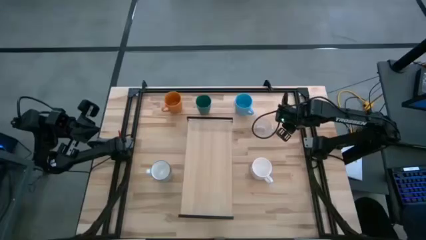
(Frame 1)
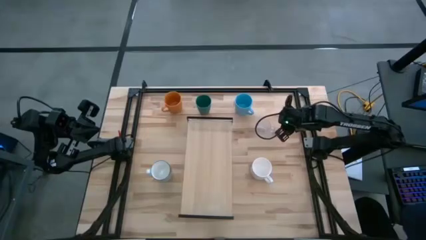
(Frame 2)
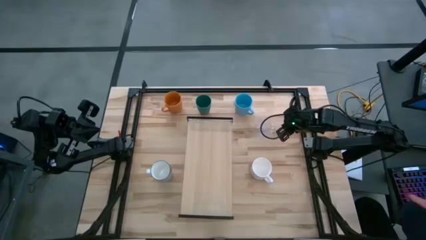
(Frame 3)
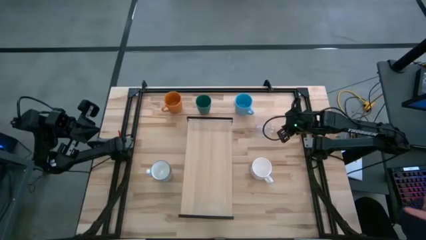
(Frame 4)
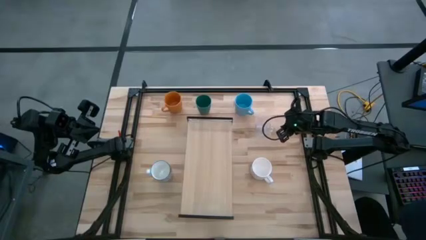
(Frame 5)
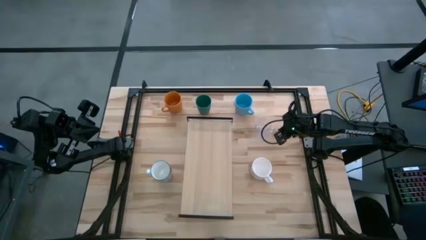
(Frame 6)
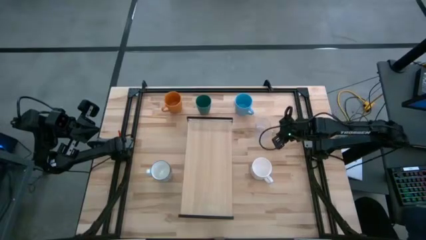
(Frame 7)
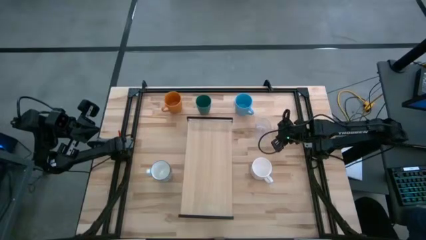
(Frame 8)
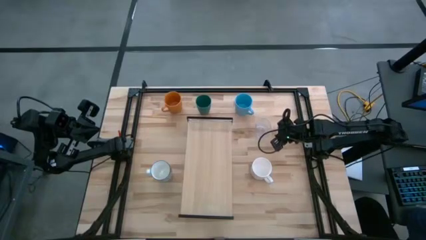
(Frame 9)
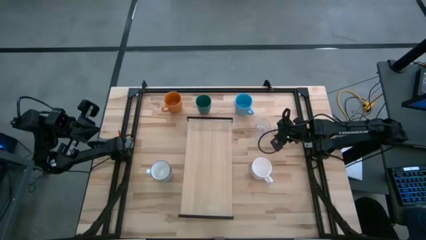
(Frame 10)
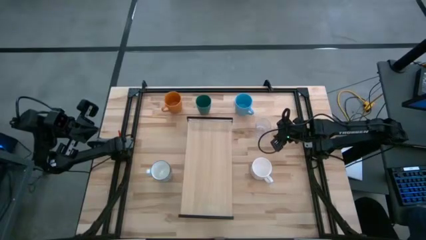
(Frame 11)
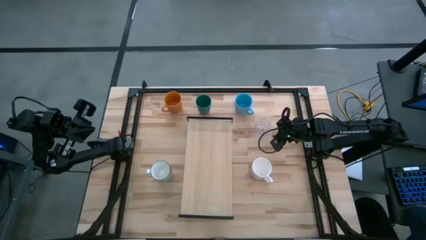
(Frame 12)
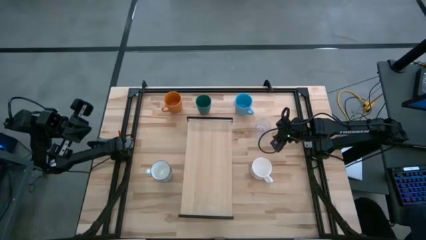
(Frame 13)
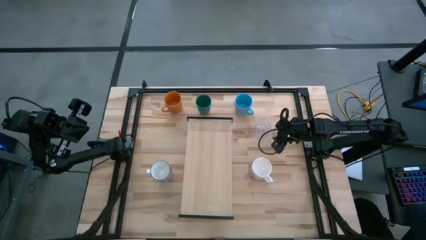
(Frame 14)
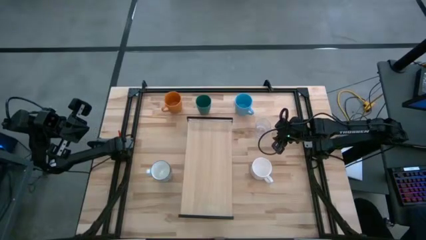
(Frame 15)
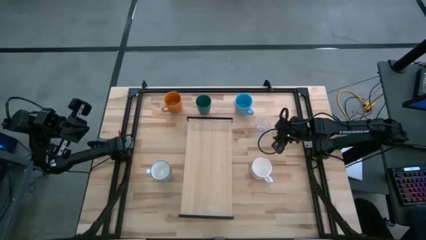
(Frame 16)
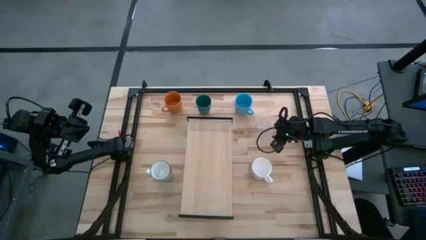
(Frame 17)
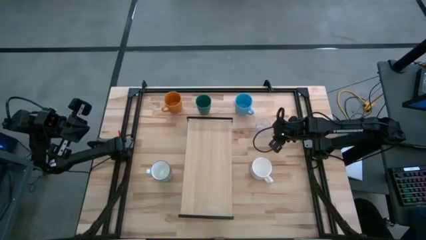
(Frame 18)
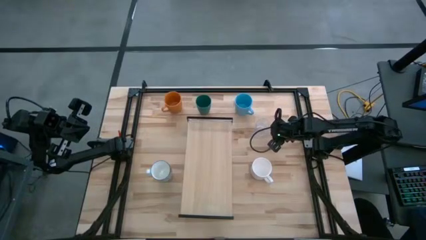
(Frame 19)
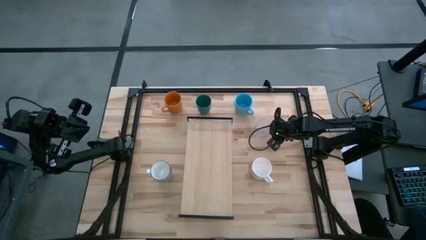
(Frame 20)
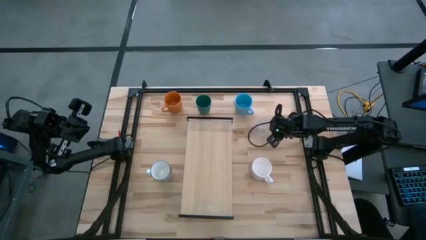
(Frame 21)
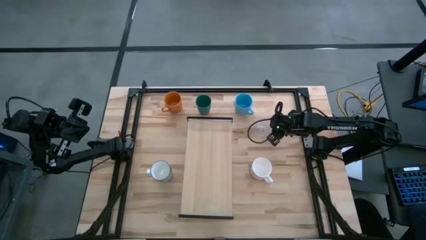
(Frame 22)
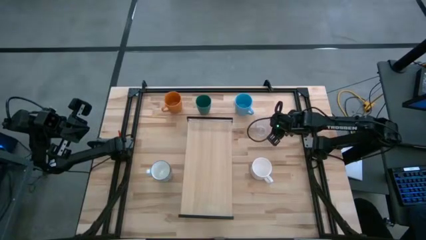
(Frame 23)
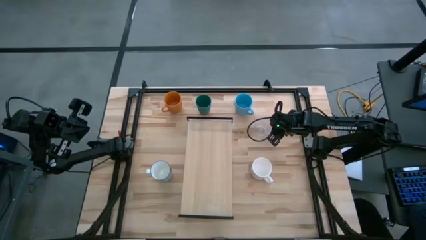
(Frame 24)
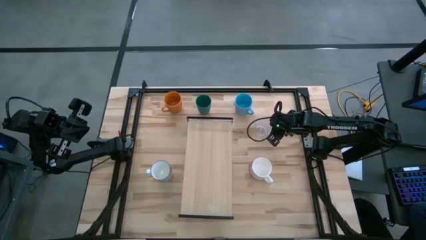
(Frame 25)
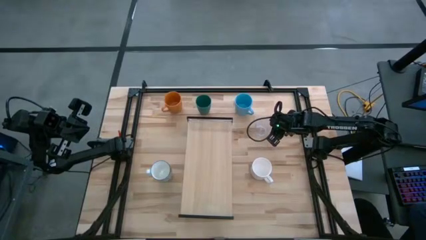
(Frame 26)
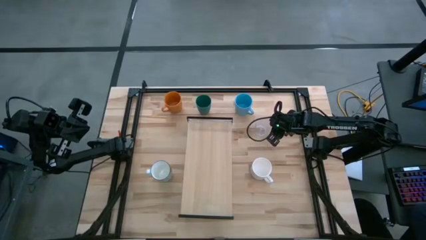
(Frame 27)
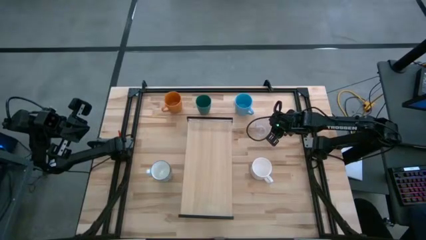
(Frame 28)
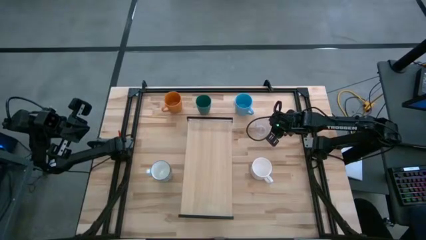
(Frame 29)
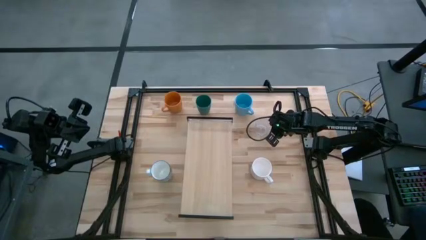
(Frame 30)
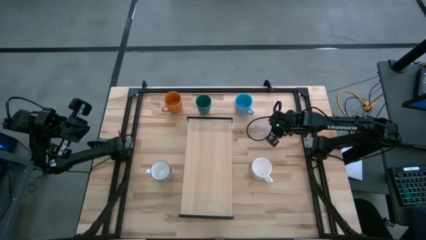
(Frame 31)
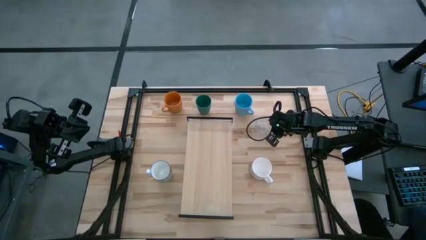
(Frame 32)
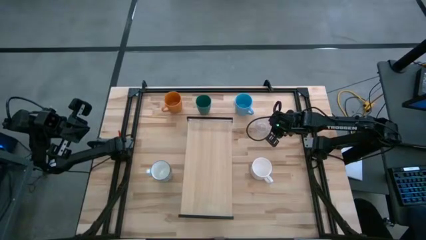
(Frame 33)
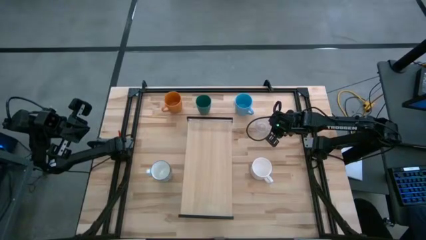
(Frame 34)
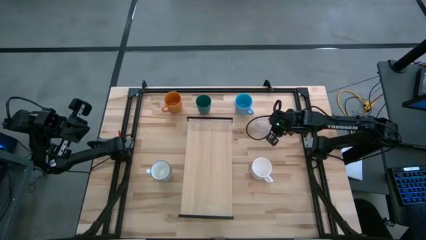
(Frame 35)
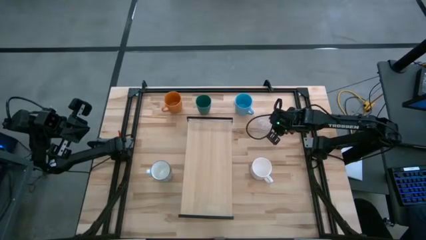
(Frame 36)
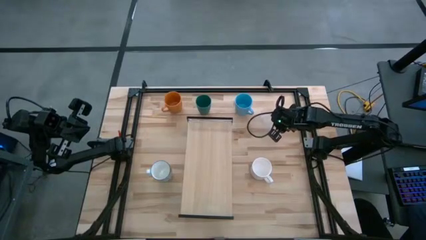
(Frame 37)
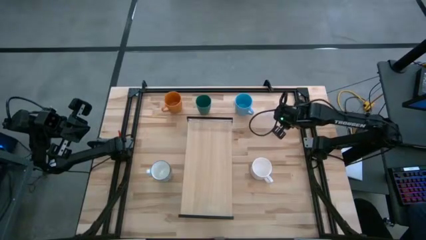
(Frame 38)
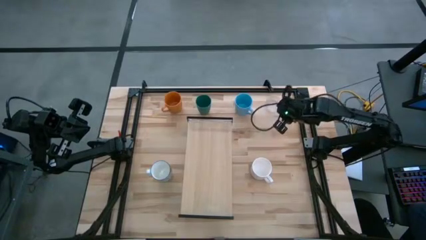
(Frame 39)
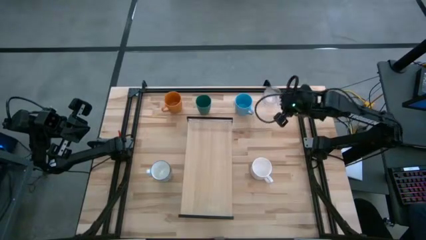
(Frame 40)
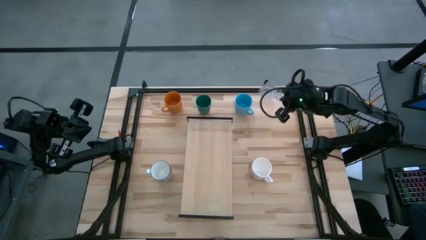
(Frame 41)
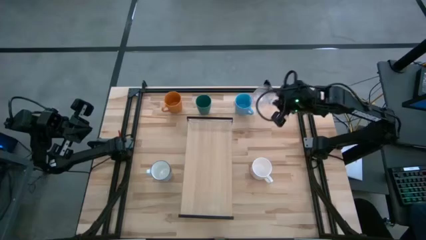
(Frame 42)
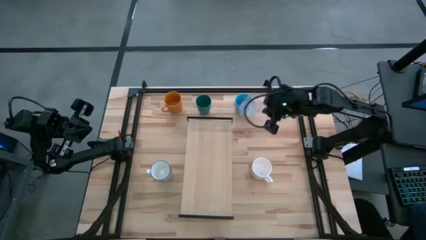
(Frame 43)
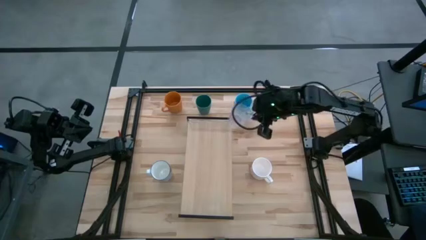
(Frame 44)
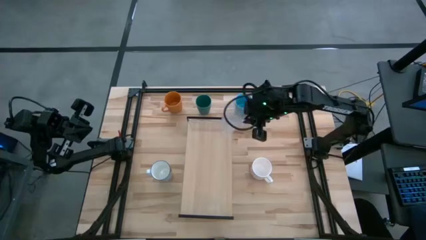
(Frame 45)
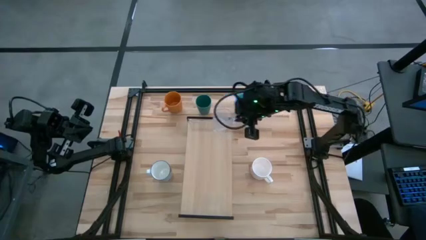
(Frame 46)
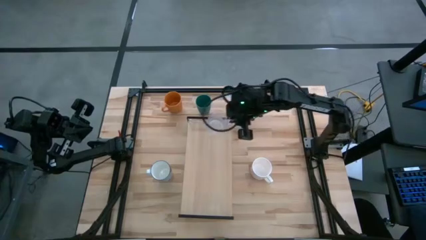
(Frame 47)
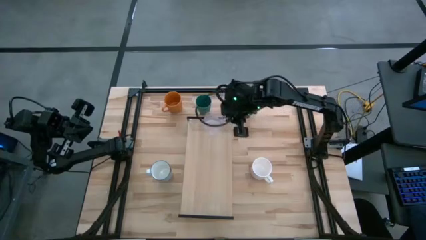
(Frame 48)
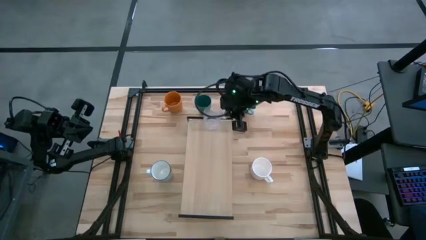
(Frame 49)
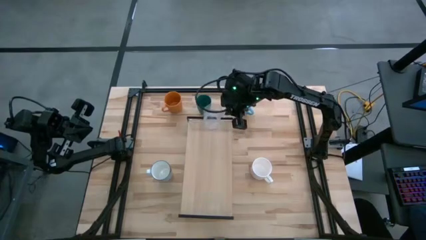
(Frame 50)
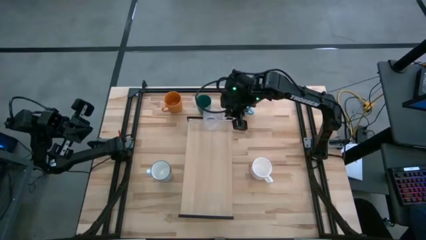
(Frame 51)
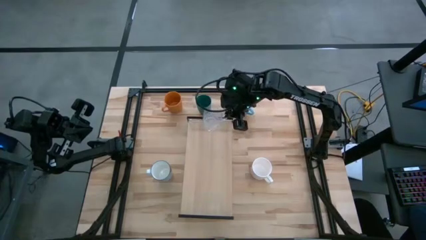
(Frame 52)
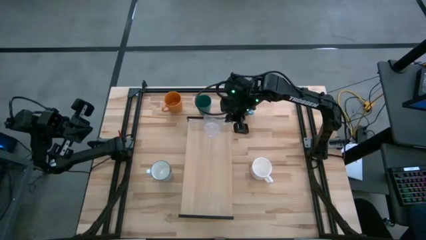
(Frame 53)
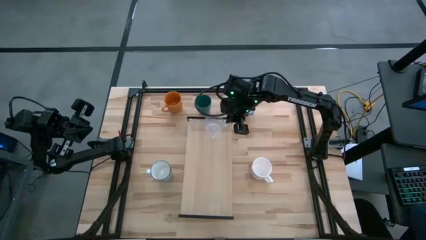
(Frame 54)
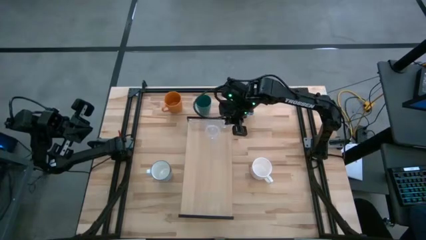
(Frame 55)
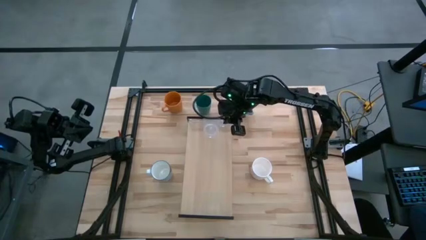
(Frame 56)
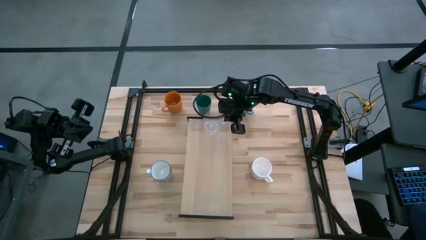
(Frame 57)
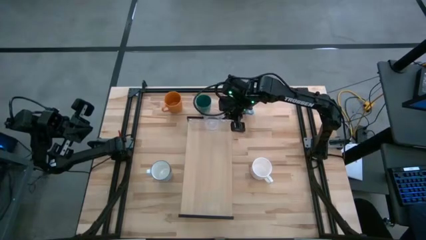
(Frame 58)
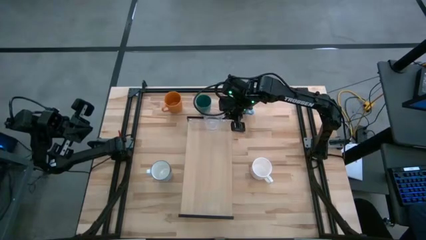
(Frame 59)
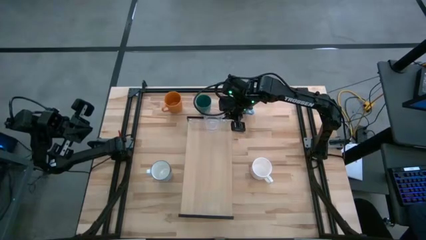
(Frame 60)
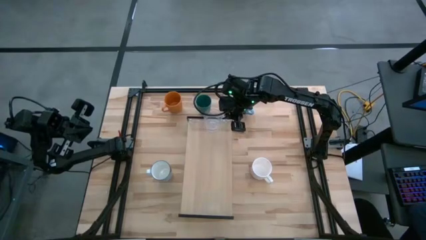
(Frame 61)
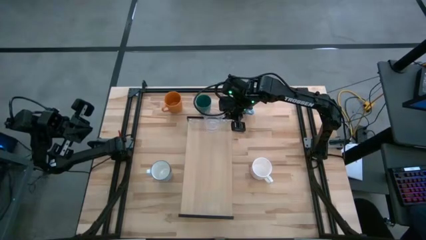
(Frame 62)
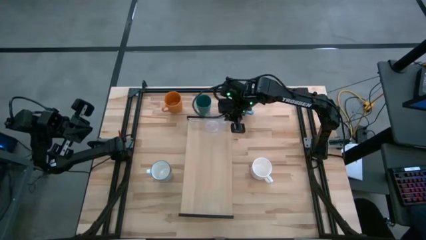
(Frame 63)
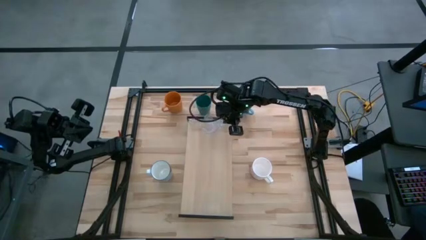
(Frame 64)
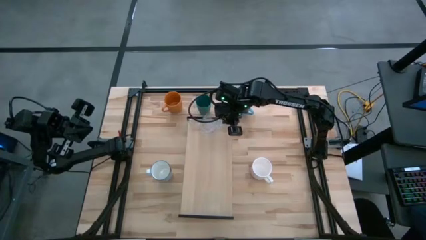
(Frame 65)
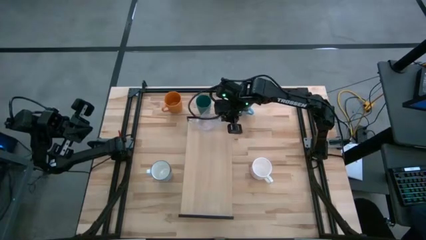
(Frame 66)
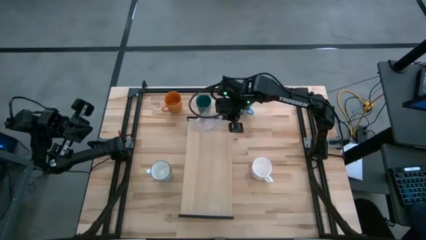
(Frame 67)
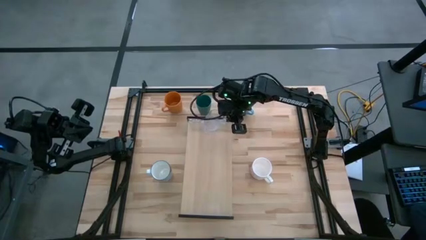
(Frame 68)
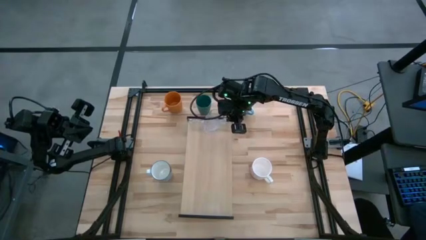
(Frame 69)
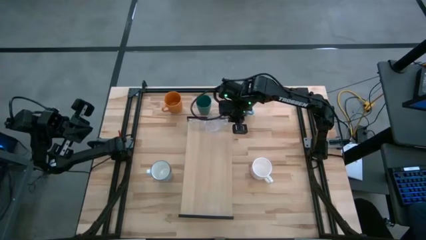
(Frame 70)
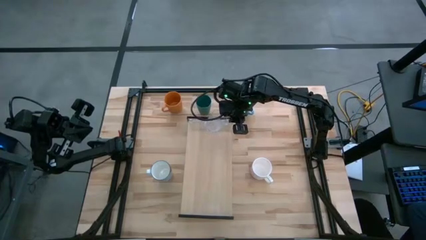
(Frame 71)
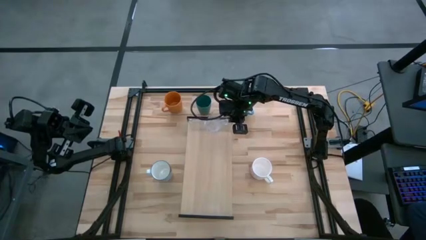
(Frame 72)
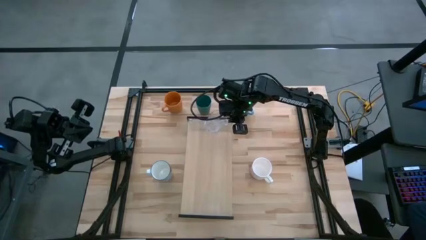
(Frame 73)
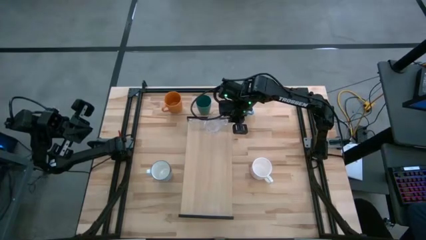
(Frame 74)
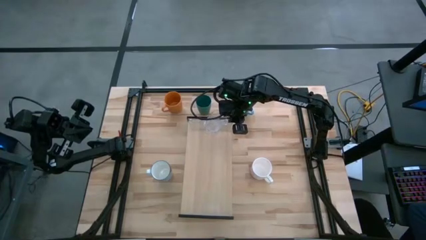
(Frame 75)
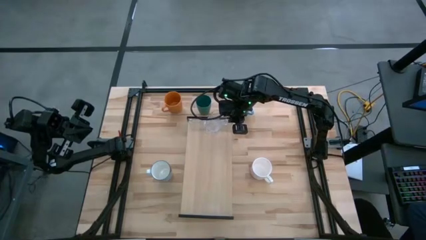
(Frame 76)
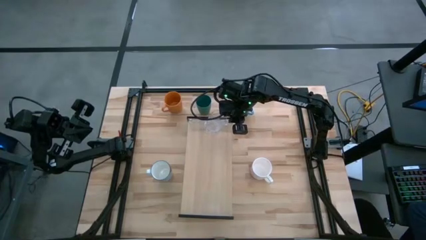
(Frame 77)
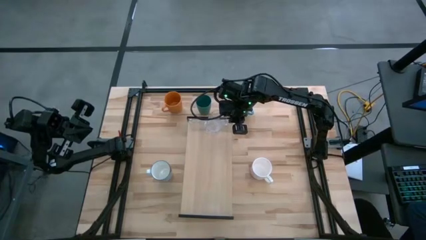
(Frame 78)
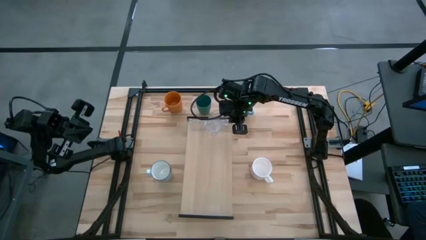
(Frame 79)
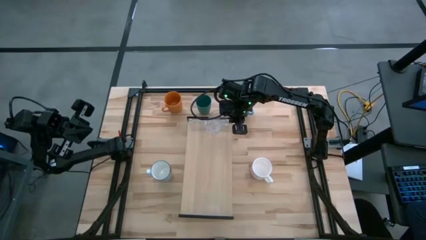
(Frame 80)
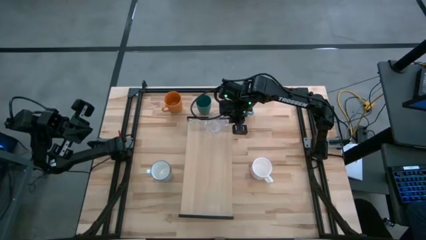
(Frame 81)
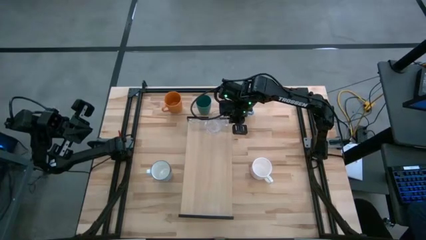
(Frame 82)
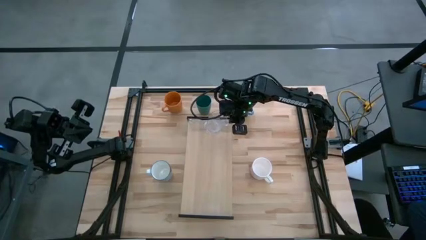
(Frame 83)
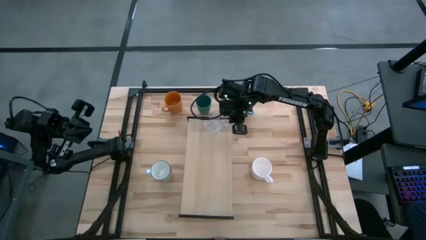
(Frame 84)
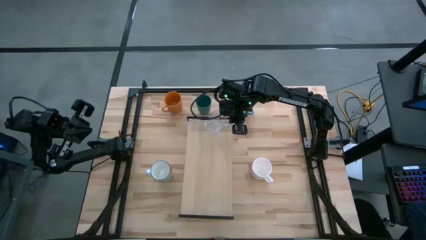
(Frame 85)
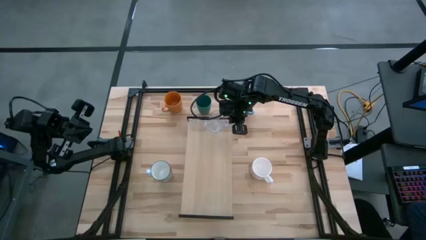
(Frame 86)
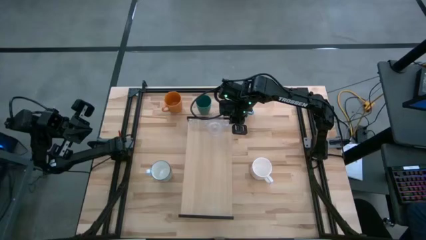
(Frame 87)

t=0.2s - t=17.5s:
Task: Stack small to large cups/mugs on shelf
Put the transparent mug on the shelf
